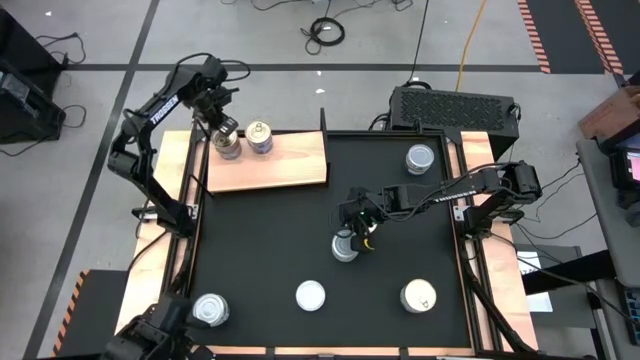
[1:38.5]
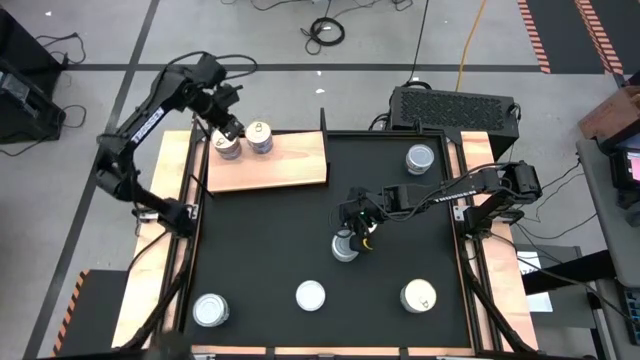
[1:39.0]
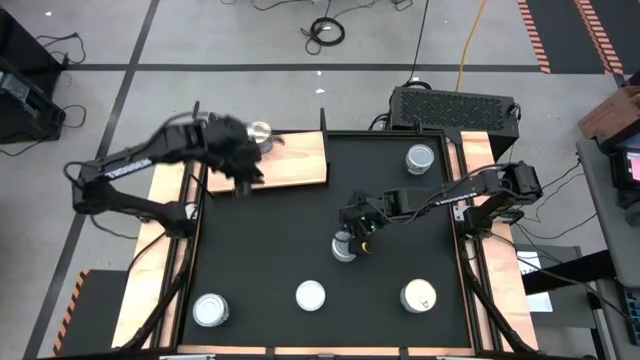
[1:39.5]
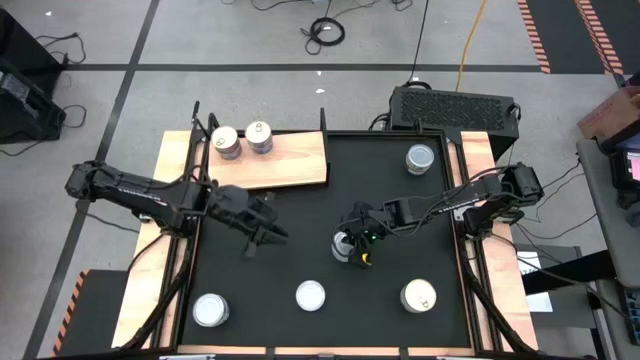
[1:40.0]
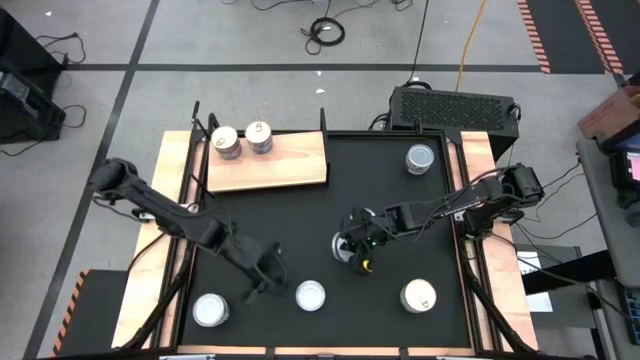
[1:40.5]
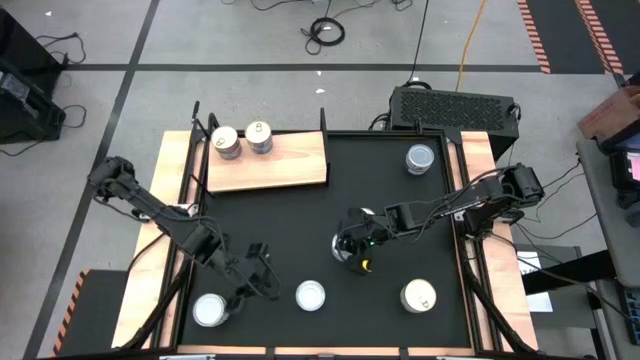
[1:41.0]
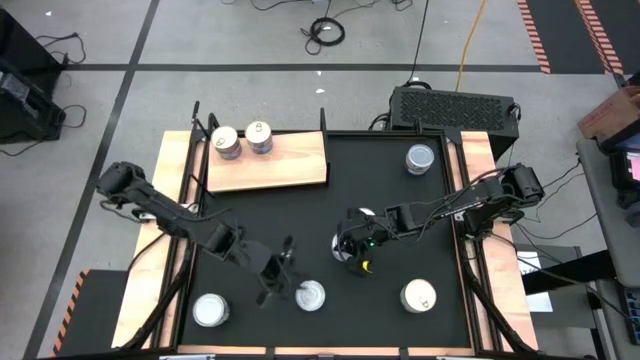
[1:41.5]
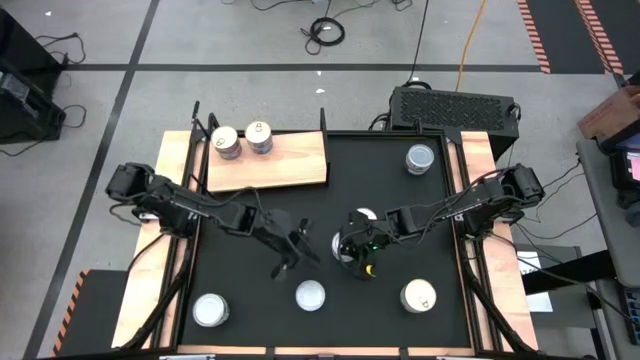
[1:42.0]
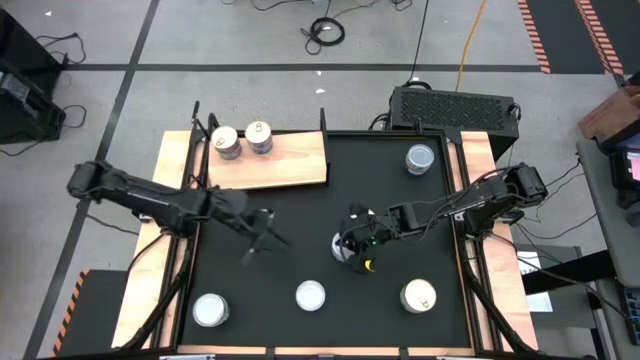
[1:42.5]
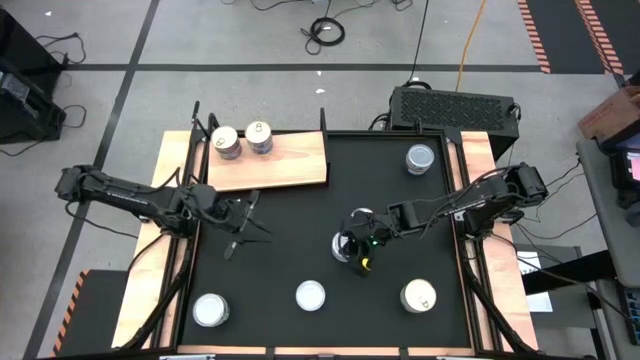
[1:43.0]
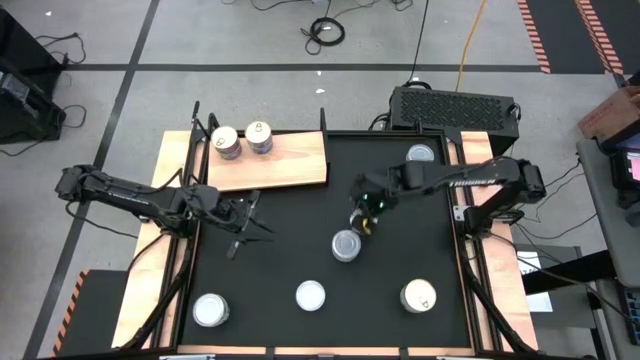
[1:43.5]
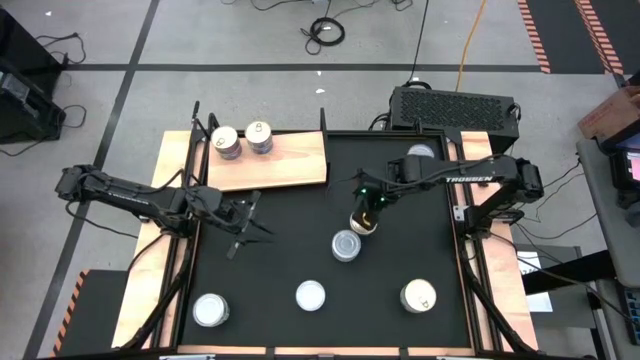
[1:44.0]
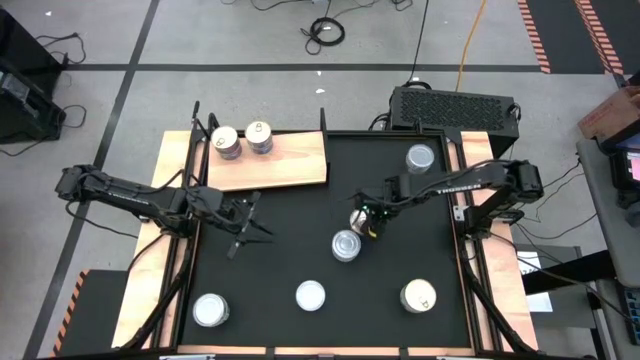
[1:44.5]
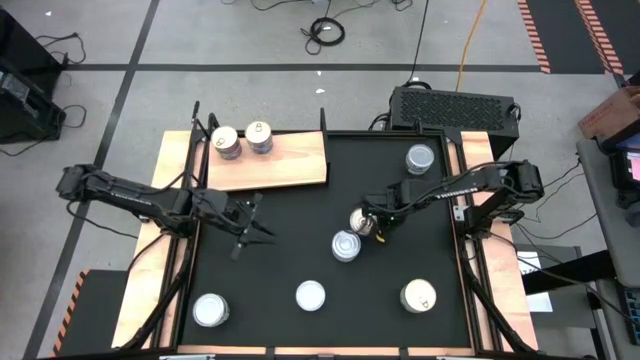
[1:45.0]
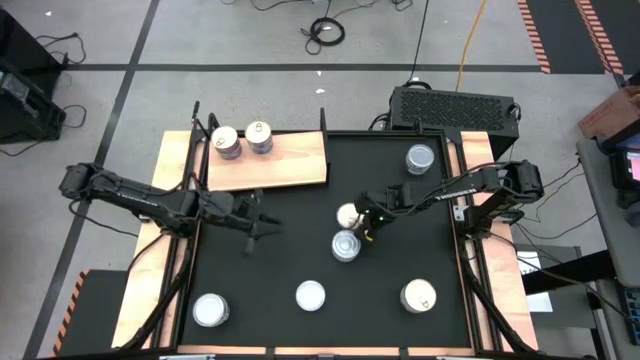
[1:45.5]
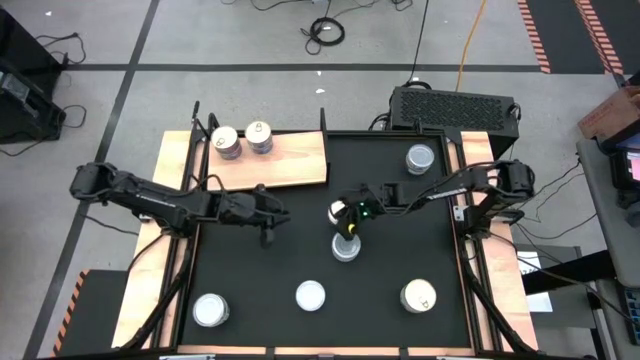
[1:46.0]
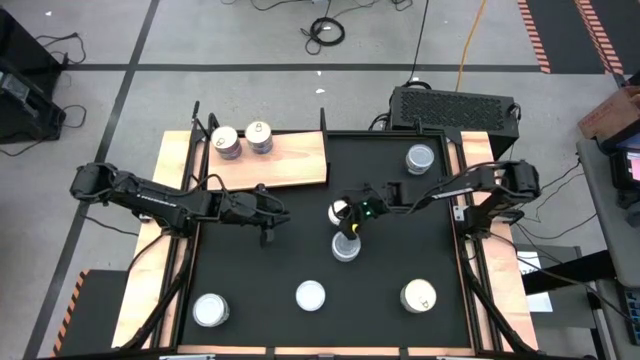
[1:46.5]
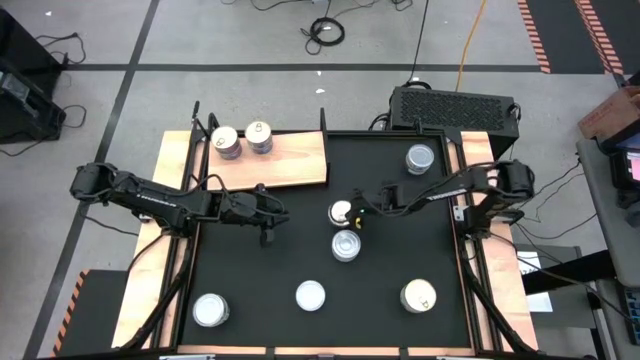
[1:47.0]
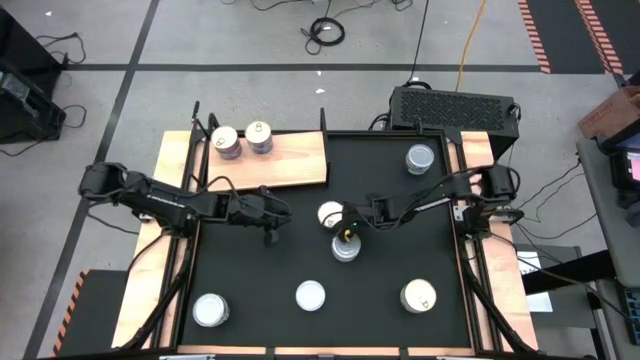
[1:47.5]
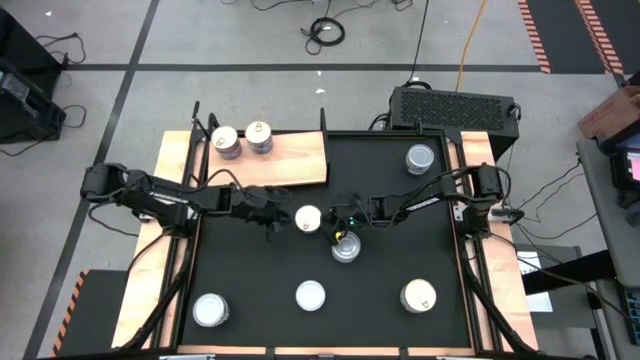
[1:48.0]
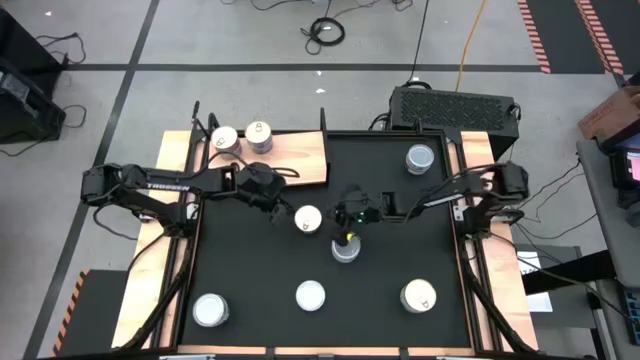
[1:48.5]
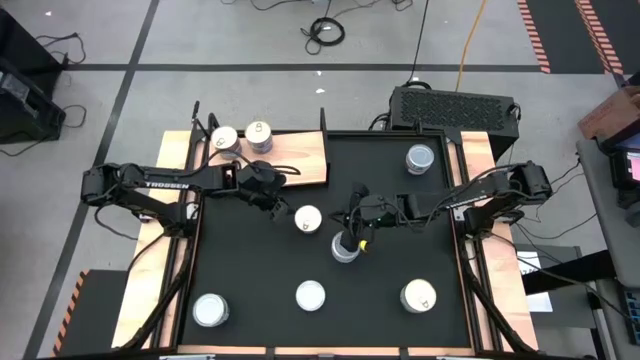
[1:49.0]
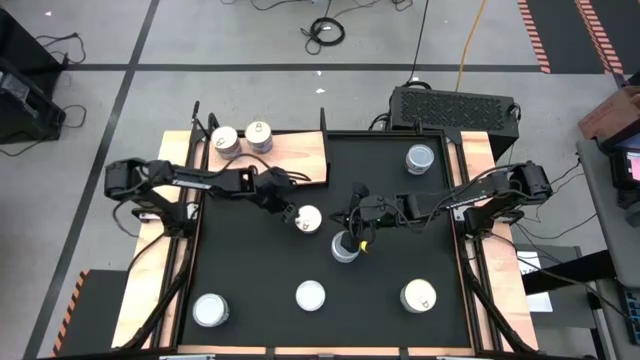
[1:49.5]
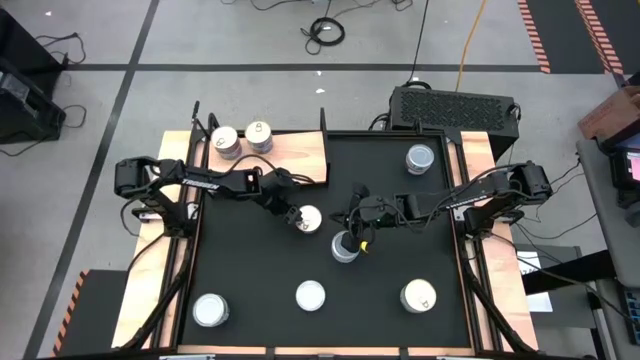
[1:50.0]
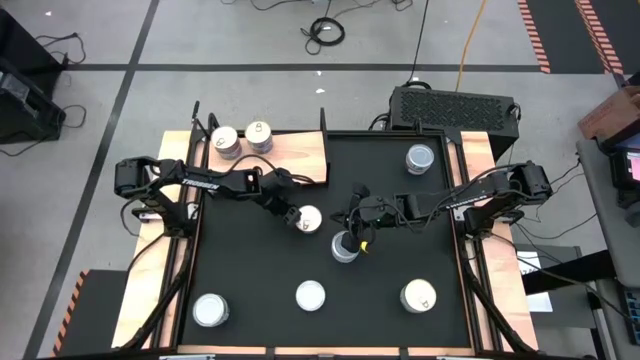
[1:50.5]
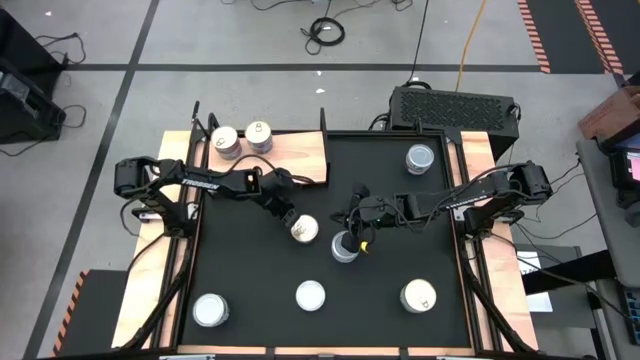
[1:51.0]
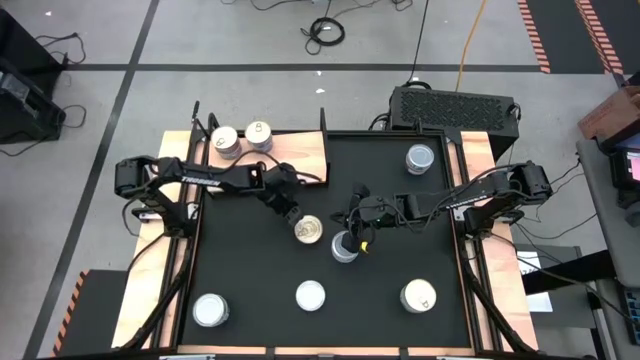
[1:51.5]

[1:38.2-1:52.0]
Task: Stack canned seafood by type on shelf
Put the blue and pink tuna can on the bottom left of the shelf

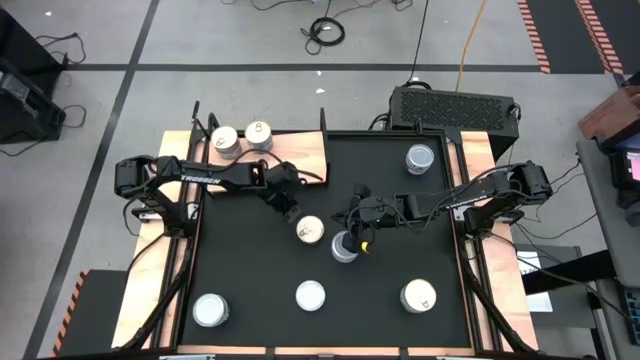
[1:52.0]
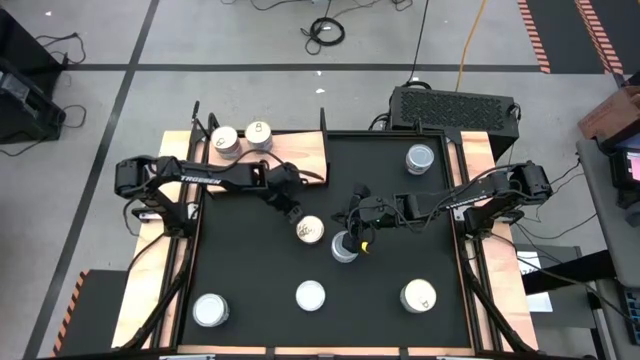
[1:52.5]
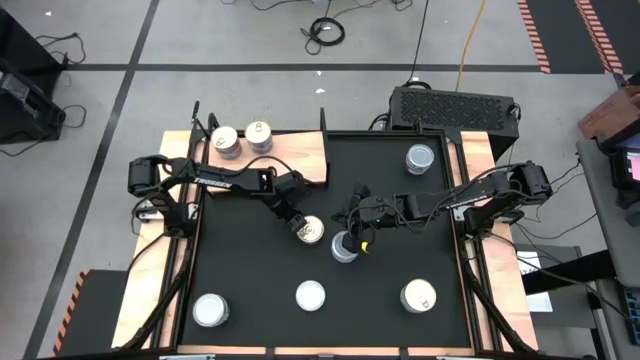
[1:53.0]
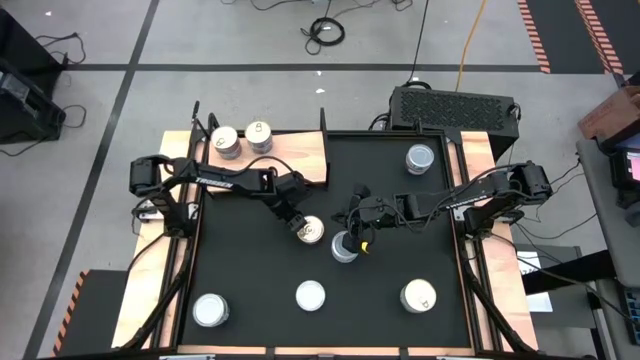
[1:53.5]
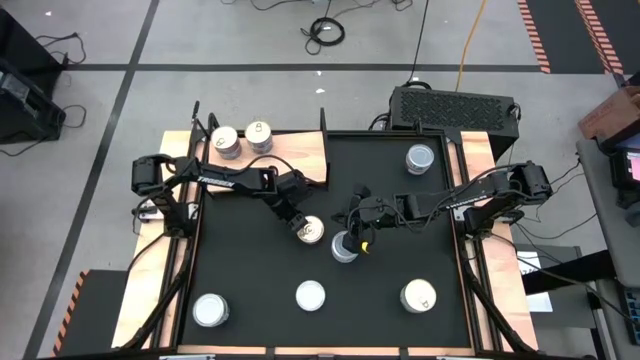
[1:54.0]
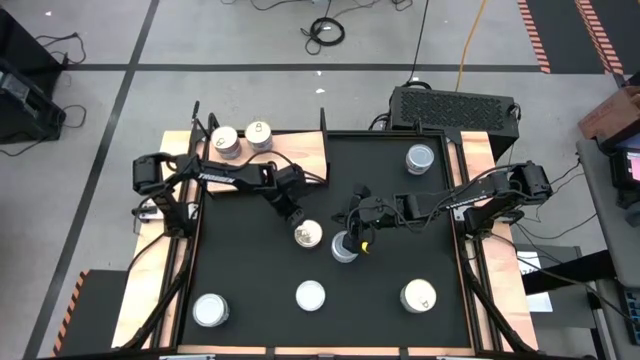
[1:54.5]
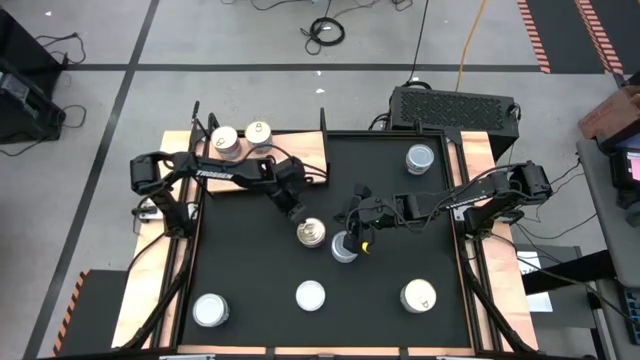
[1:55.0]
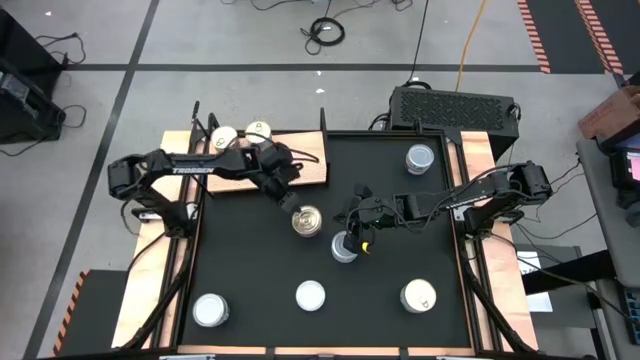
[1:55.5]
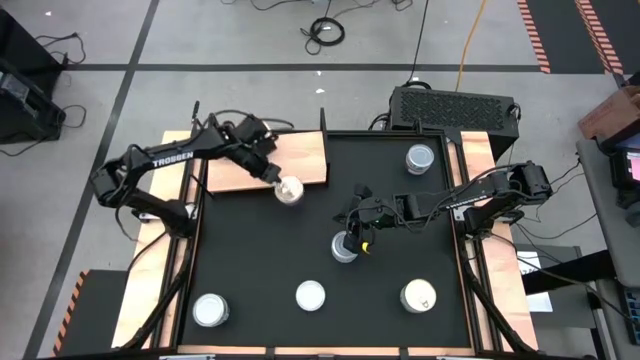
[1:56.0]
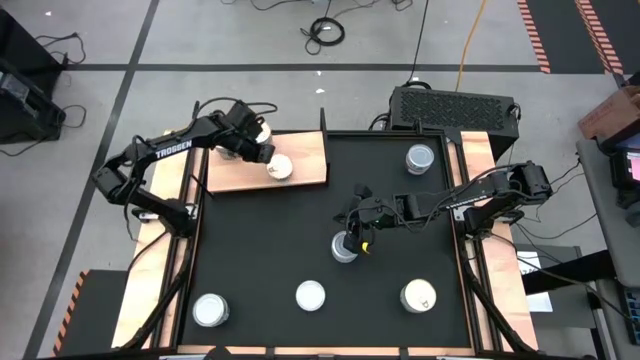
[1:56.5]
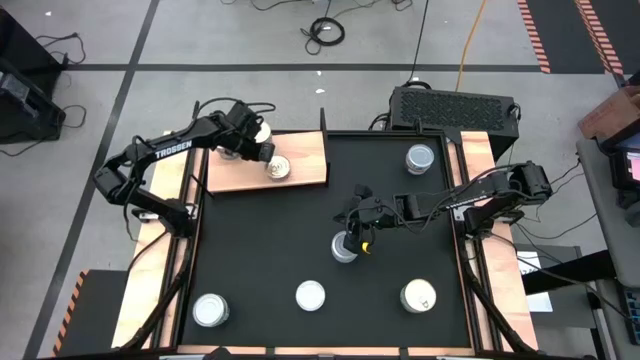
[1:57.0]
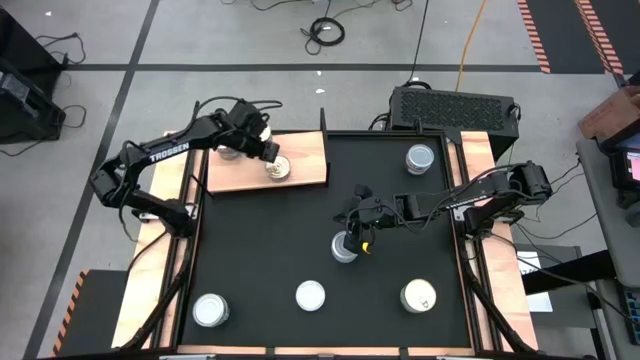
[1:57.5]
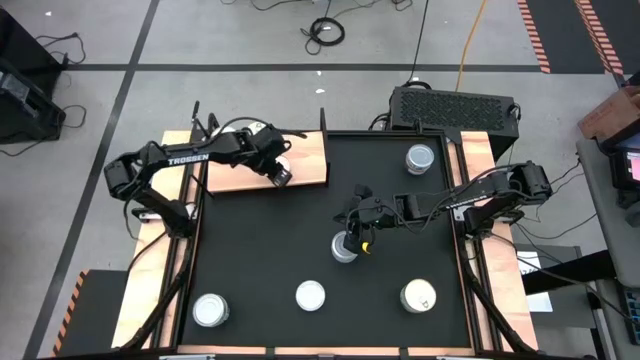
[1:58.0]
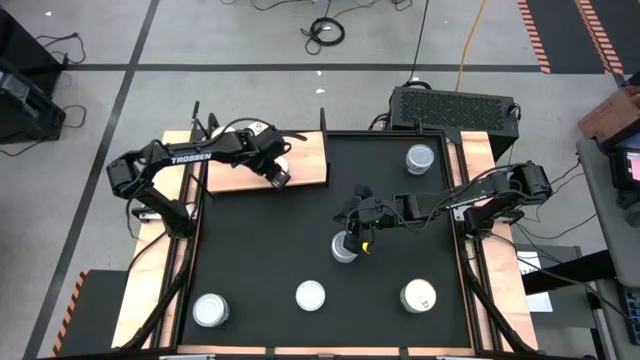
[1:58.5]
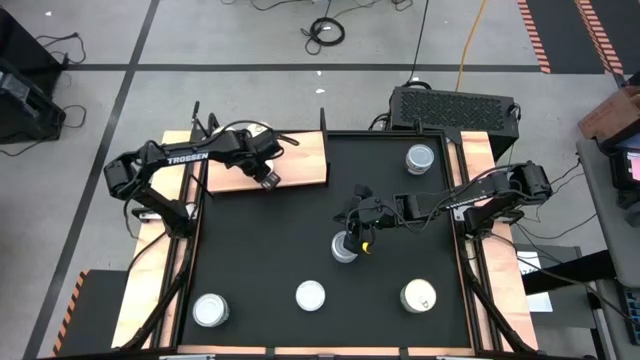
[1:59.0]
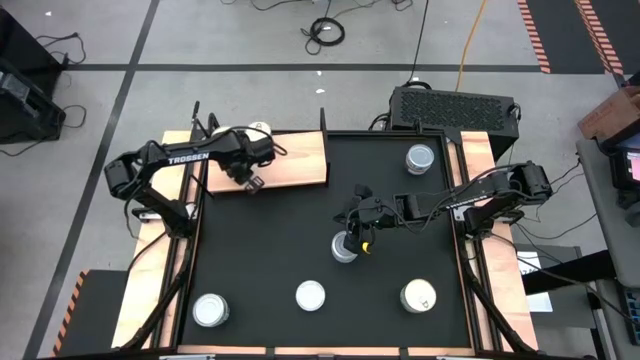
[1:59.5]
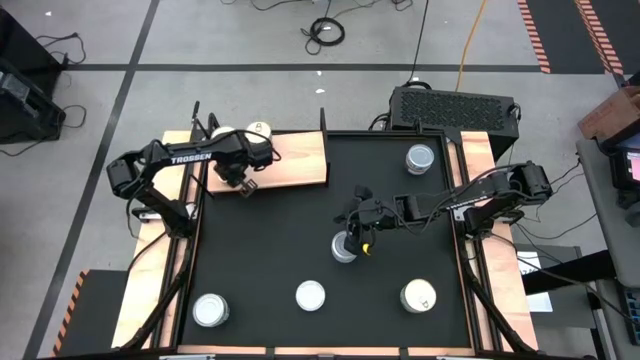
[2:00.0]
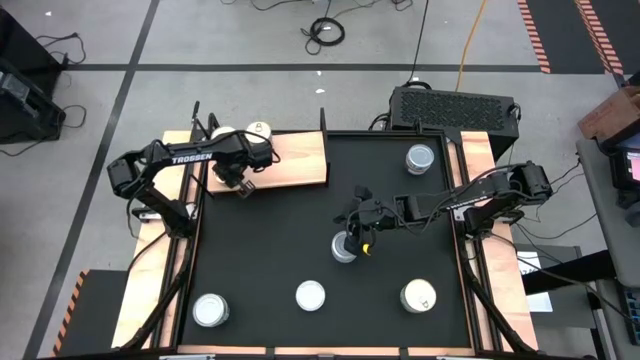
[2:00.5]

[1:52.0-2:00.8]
Put the blue and pink tuna can on the shelf
